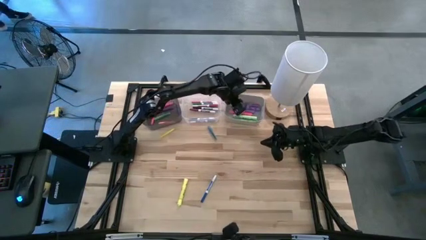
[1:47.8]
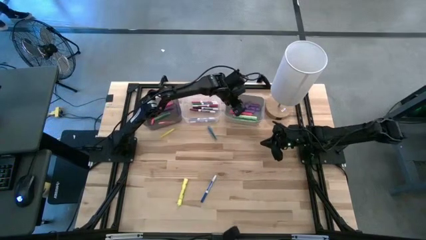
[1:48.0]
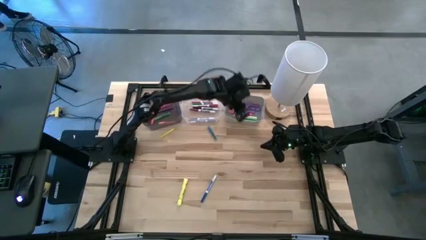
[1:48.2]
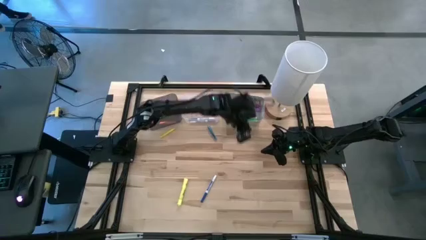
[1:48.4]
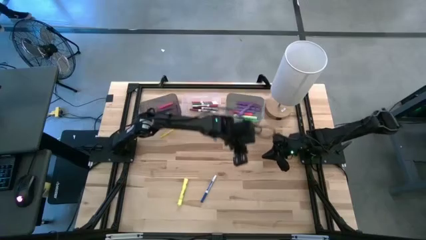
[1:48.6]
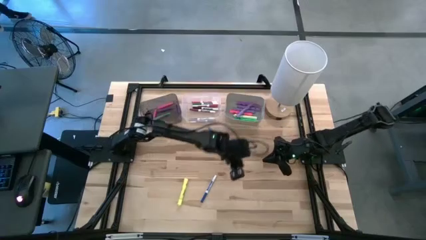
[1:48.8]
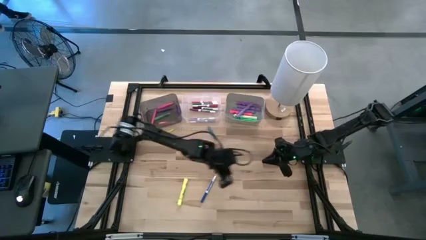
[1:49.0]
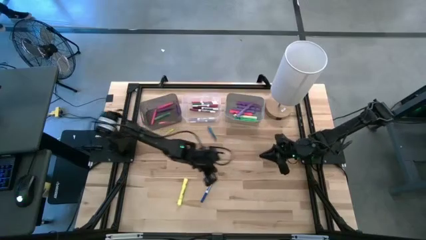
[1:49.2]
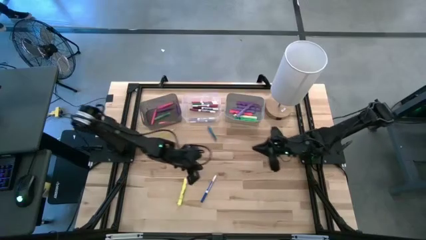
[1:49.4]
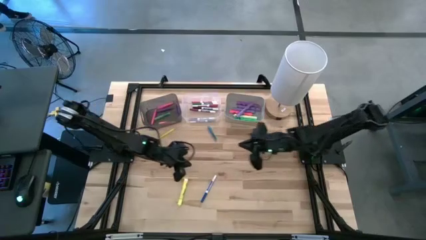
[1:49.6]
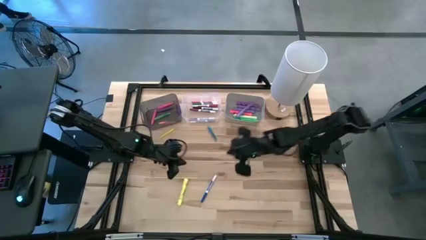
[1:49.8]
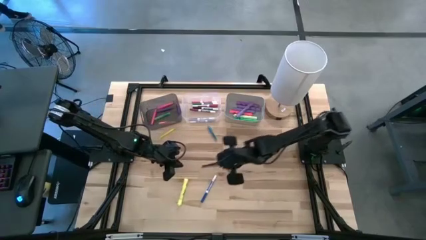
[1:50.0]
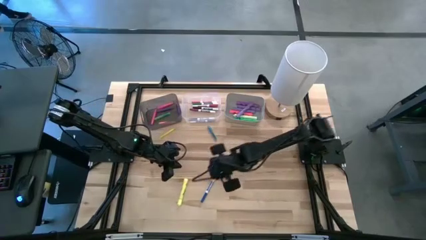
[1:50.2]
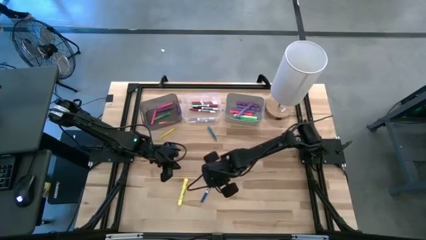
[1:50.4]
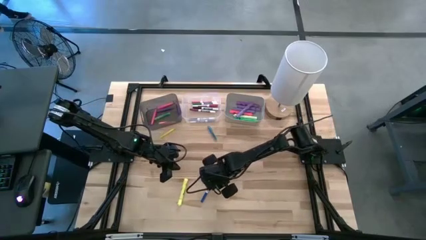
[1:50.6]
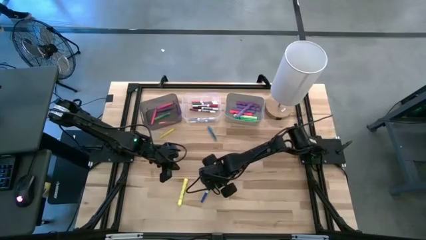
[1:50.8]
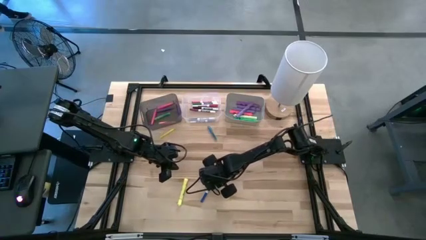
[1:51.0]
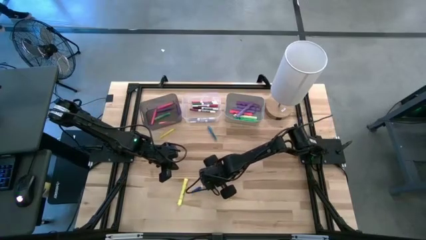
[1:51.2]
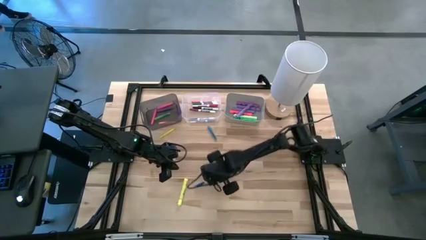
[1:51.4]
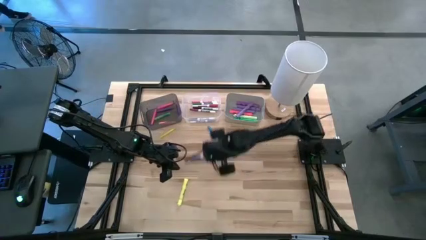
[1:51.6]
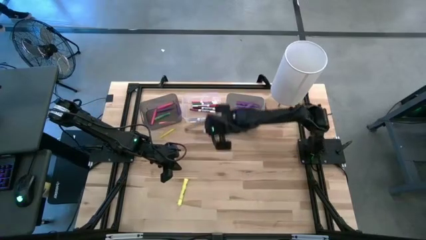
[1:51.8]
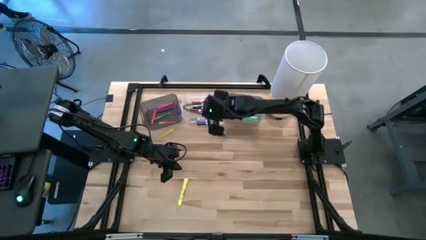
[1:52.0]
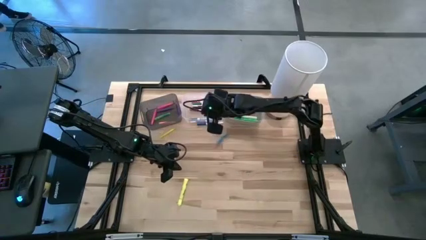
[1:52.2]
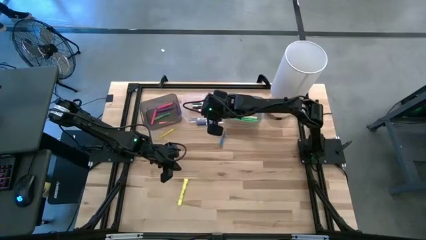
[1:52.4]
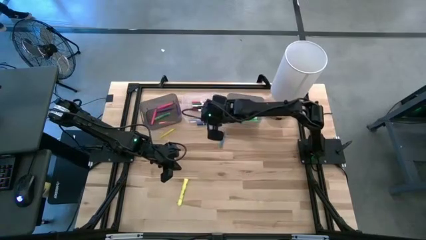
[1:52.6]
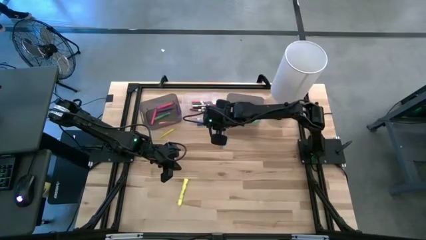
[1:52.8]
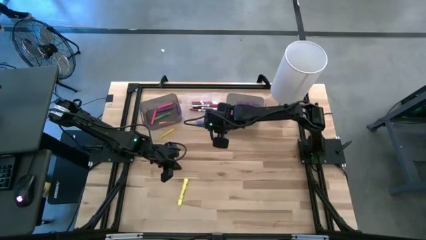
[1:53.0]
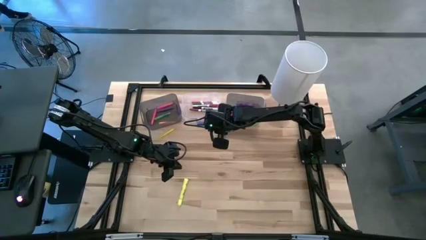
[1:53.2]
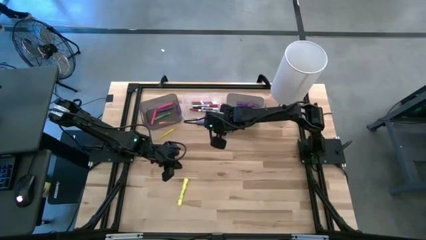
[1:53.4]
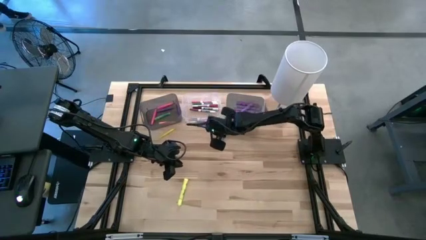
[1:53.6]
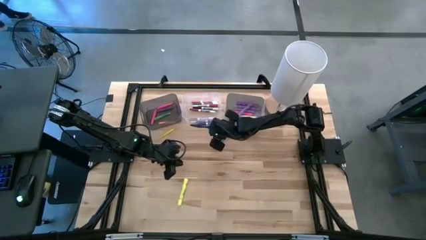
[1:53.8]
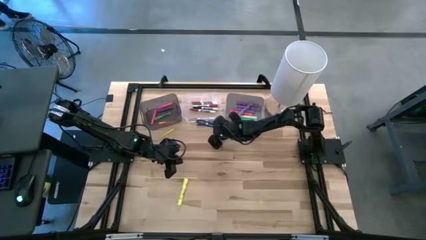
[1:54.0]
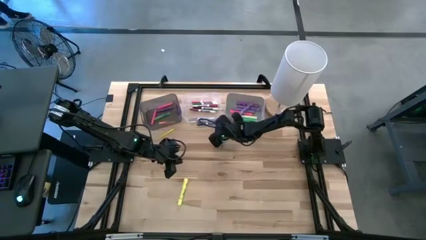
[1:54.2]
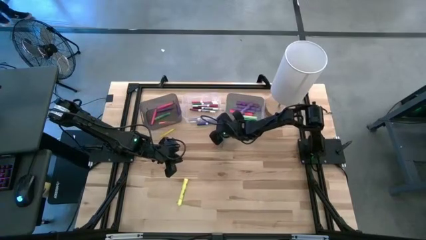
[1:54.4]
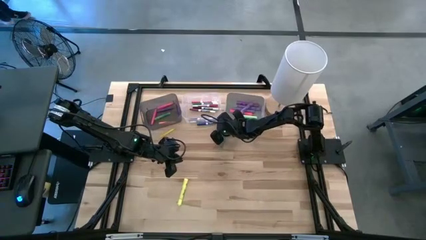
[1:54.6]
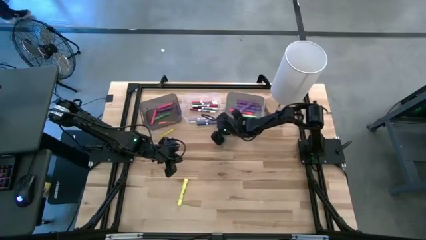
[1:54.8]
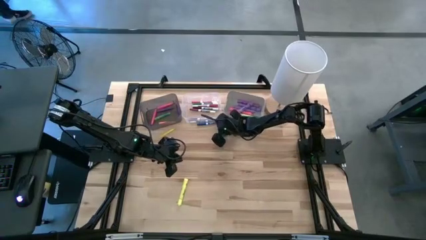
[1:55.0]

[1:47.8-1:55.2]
Task: Pick & Place Markers
Put the blue marker pen into the transparent bin

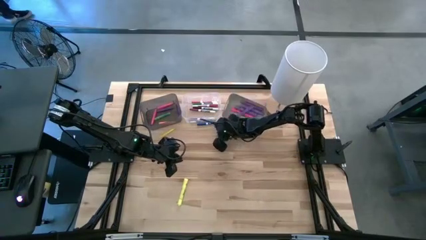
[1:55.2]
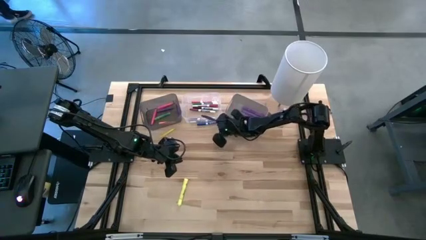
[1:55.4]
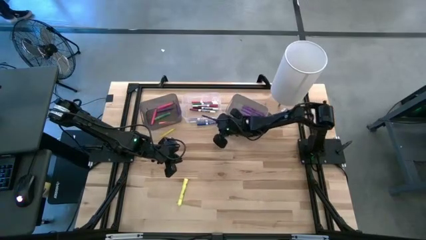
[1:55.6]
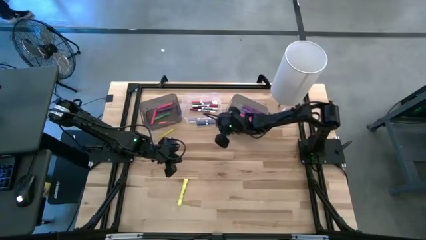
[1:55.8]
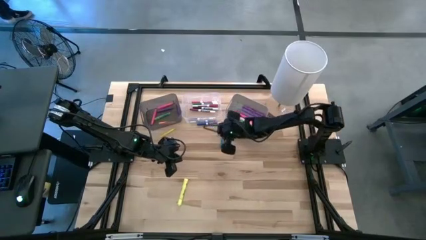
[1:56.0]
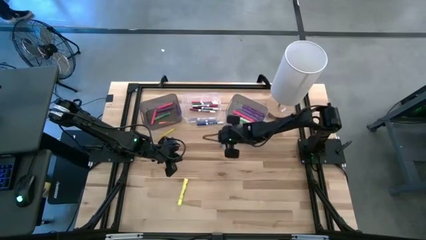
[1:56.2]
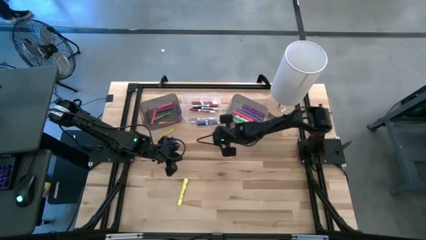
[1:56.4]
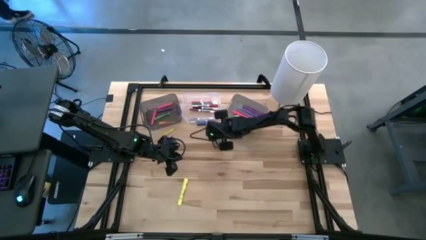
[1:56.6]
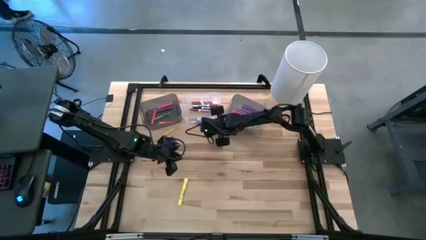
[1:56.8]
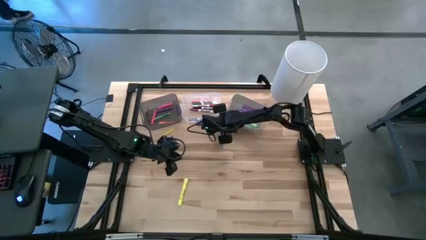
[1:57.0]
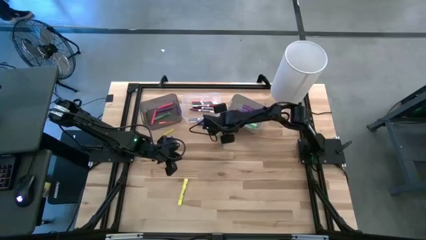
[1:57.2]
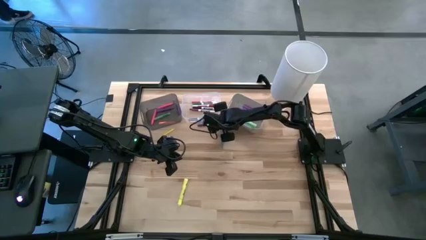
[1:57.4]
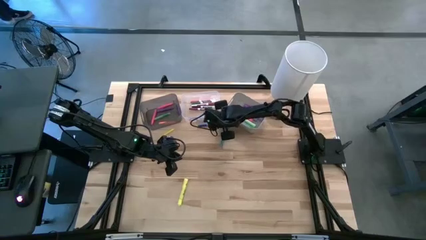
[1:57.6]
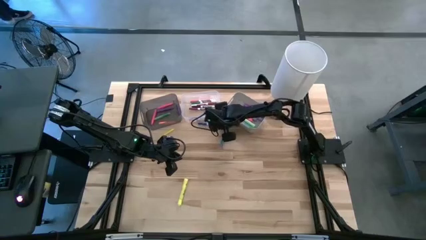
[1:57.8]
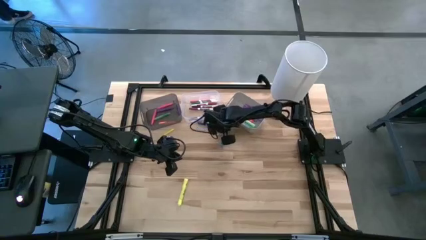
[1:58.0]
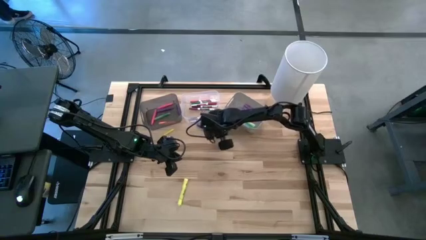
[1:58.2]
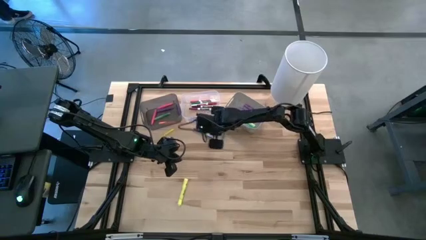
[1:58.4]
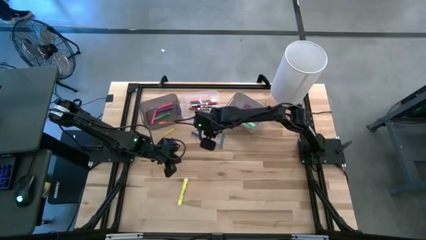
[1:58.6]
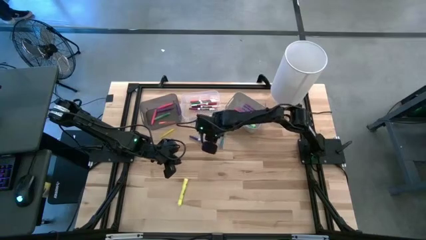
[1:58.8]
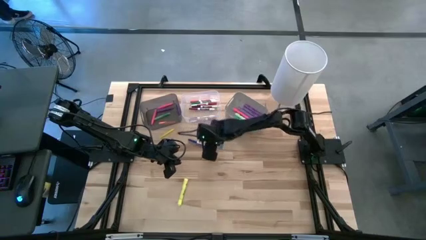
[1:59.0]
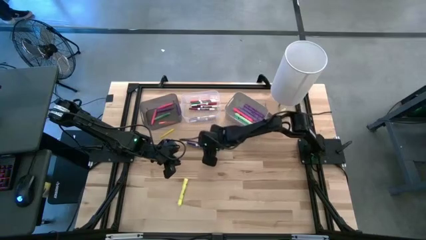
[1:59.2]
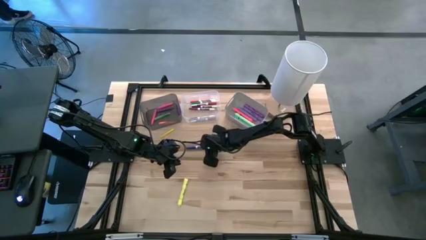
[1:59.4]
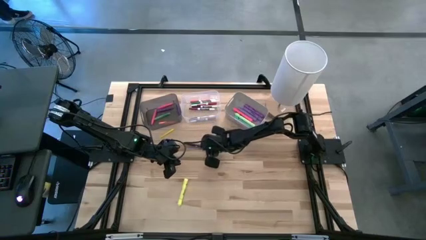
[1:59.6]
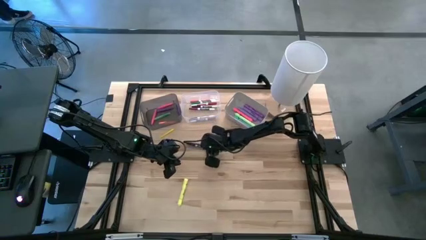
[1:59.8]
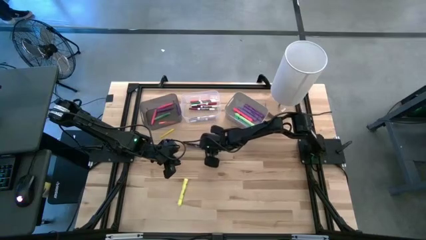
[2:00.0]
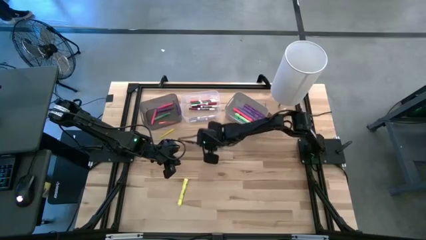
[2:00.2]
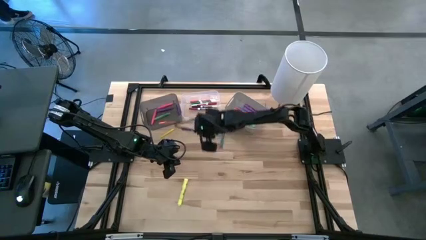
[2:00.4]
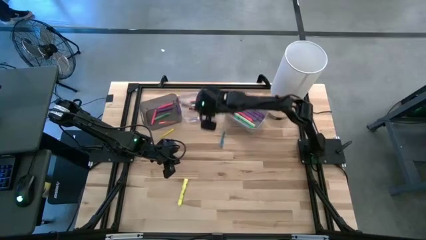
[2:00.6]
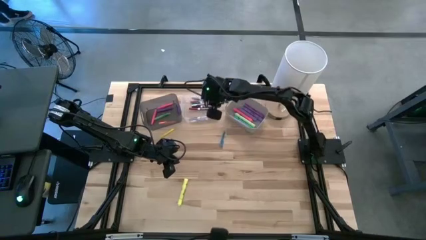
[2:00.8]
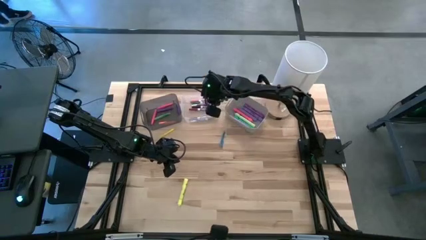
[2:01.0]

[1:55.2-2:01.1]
Put the blue marker pen into the transparent bin

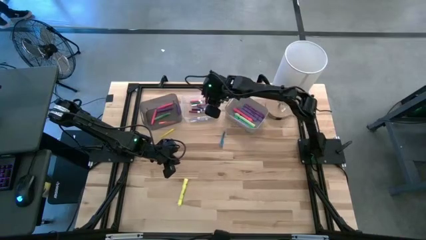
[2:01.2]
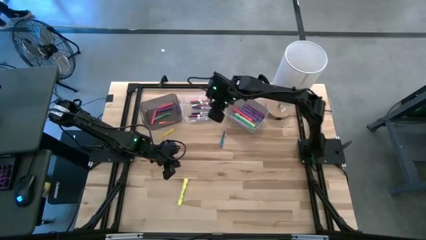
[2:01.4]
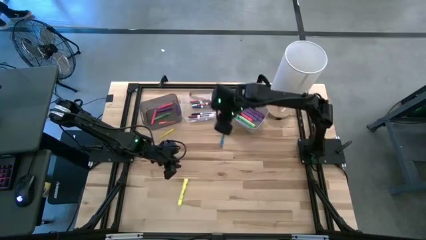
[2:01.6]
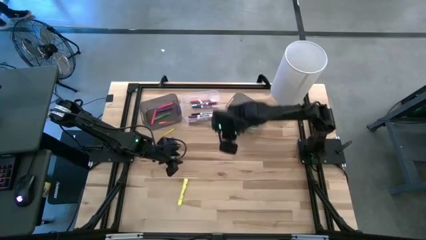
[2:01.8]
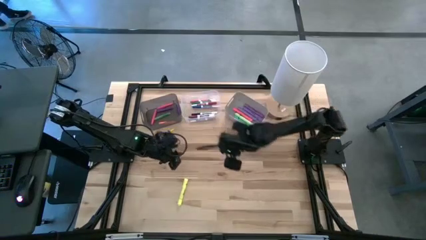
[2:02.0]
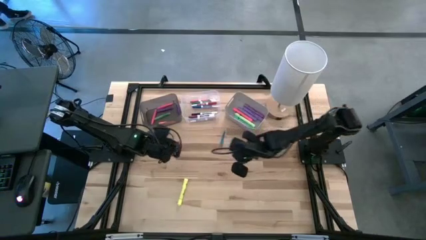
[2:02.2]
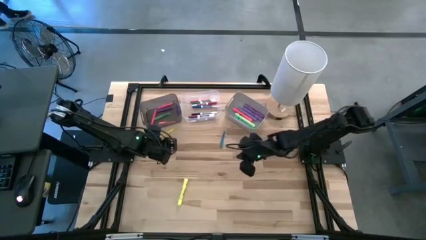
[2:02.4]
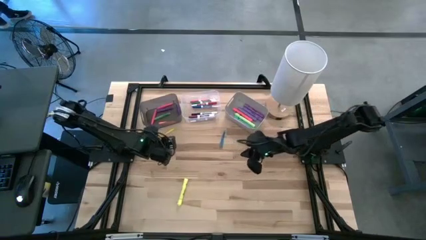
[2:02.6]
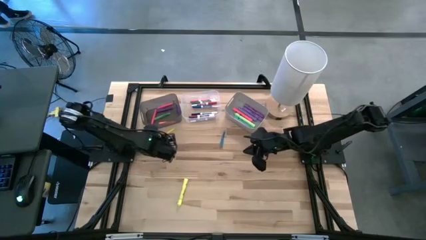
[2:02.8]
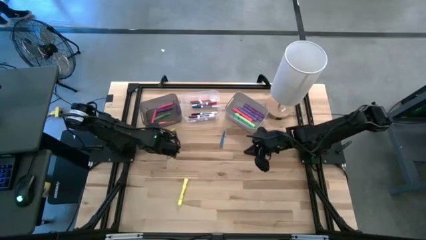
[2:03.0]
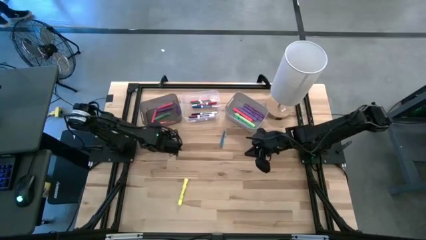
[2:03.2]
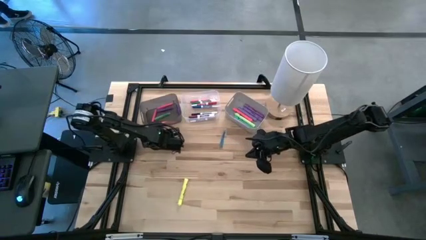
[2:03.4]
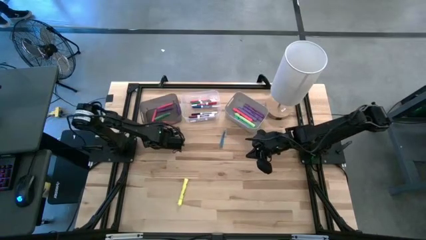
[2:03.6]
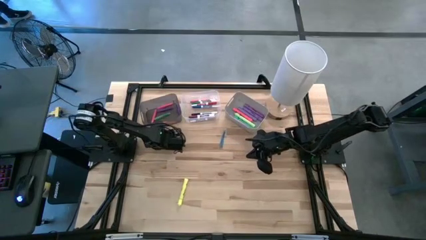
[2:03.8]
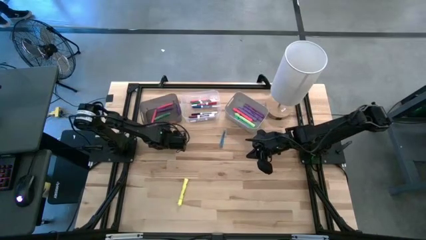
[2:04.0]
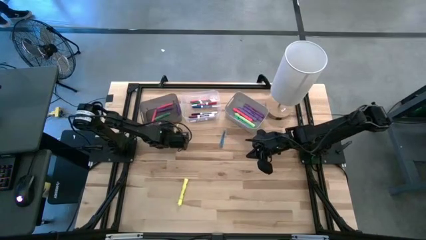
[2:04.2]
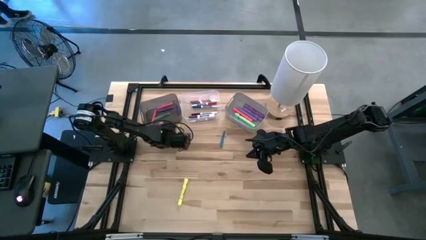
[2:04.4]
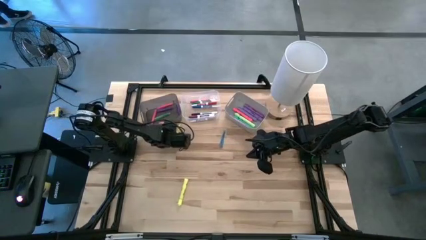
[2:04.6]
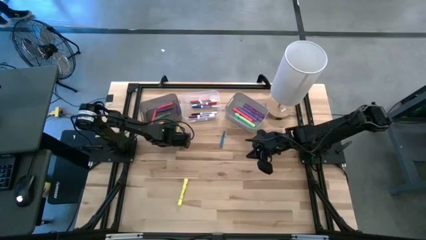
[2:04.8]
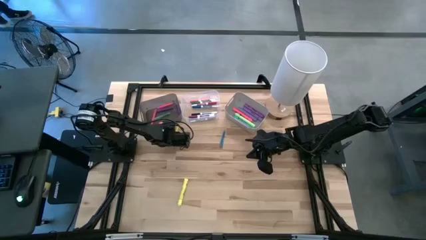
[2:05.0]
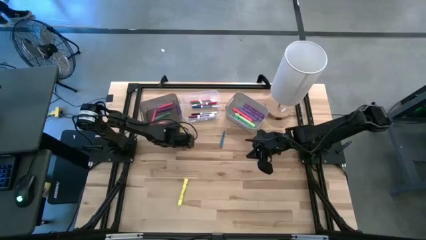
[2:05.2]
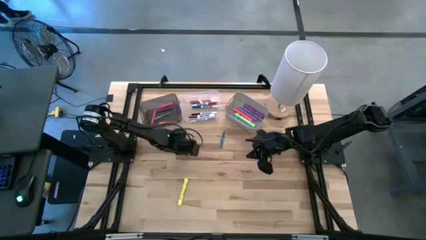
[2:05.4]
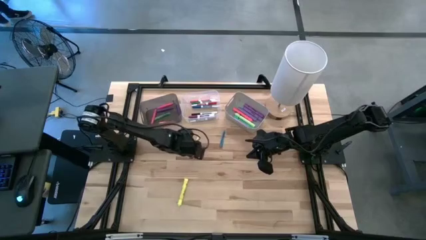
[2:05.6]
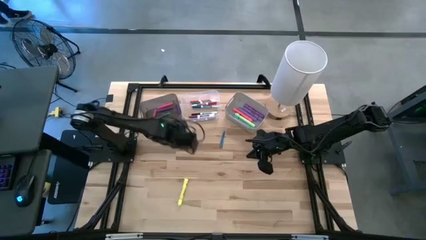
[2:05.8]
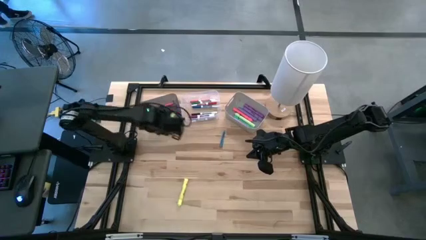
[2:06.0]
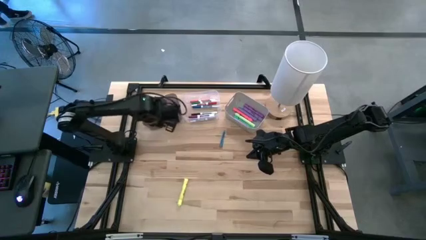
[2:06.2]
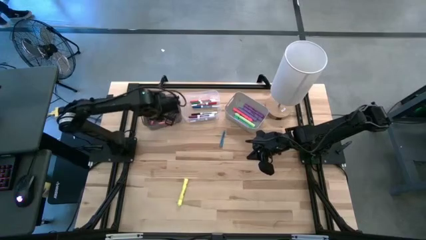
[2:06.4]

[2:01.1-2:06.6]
Put the yellow pen into the black bin
